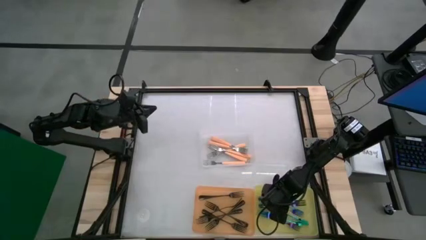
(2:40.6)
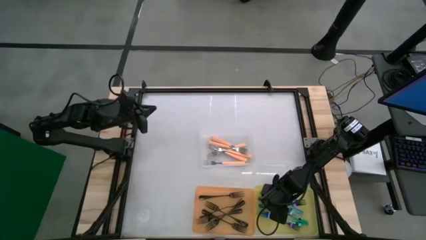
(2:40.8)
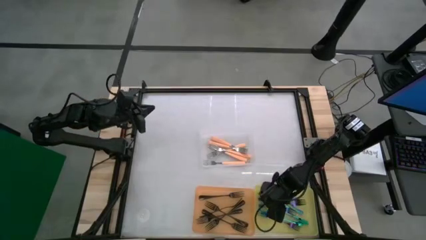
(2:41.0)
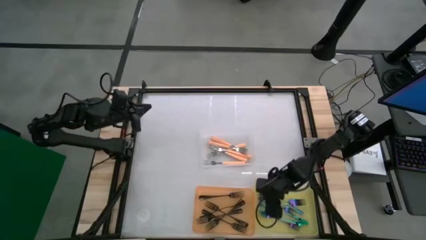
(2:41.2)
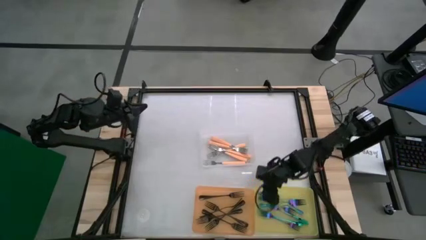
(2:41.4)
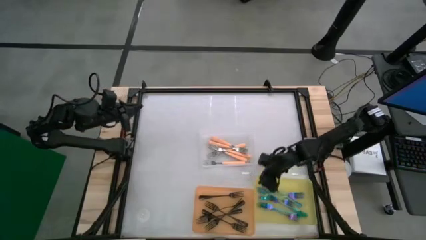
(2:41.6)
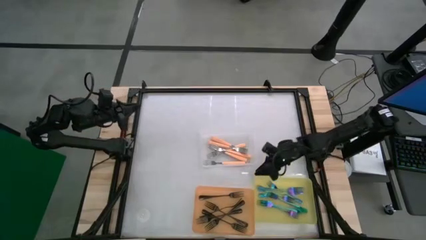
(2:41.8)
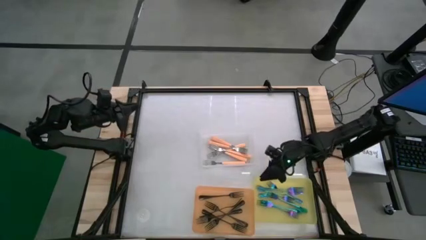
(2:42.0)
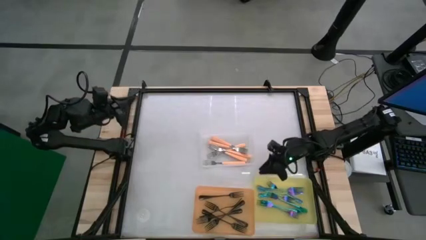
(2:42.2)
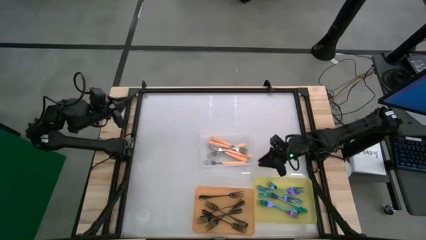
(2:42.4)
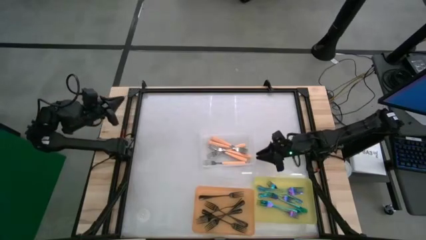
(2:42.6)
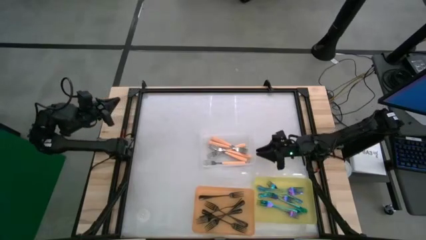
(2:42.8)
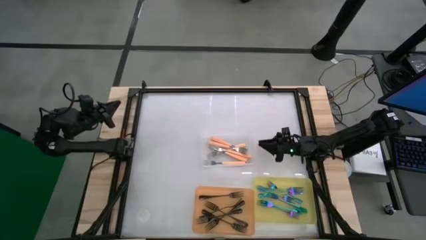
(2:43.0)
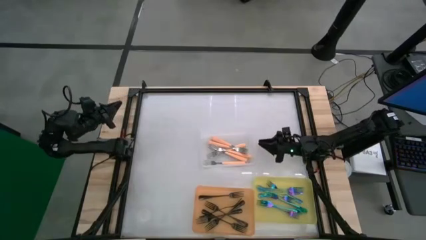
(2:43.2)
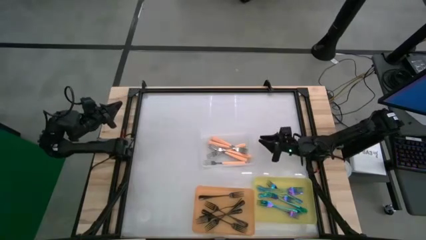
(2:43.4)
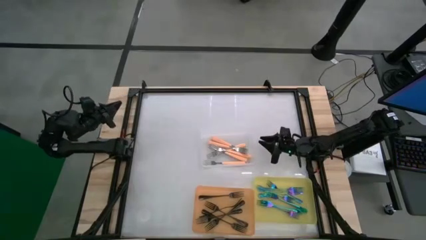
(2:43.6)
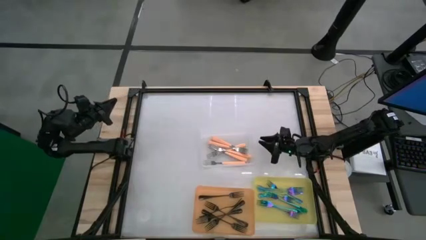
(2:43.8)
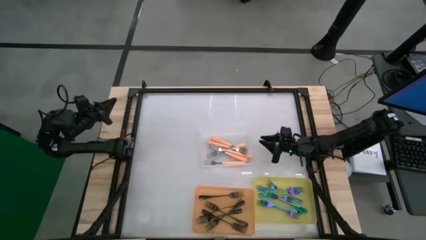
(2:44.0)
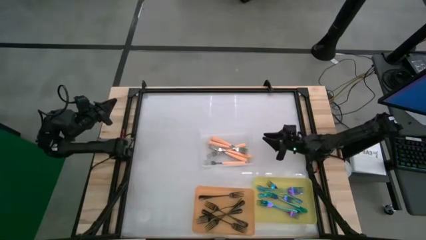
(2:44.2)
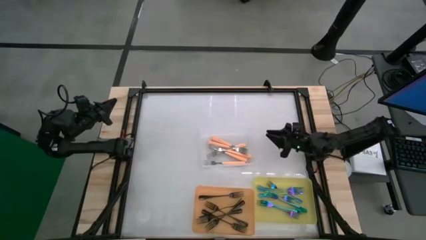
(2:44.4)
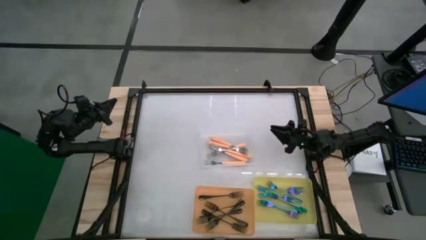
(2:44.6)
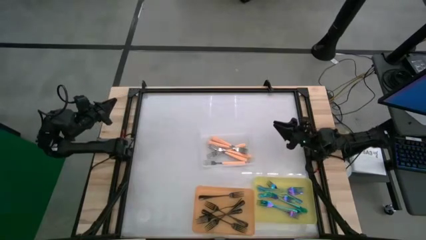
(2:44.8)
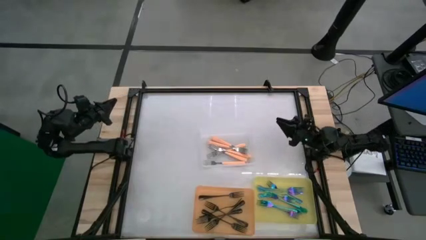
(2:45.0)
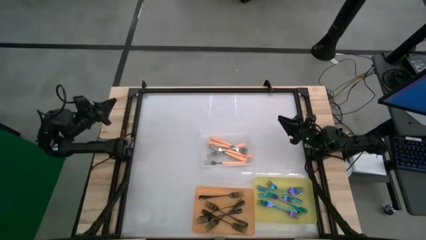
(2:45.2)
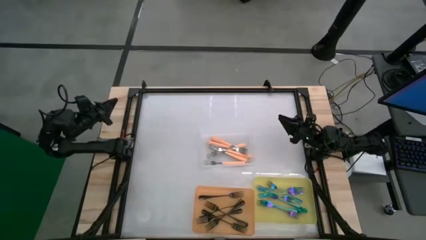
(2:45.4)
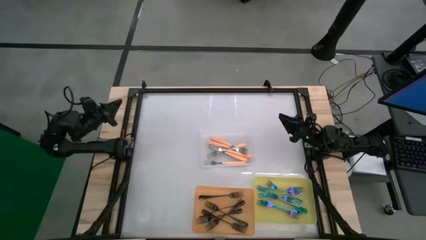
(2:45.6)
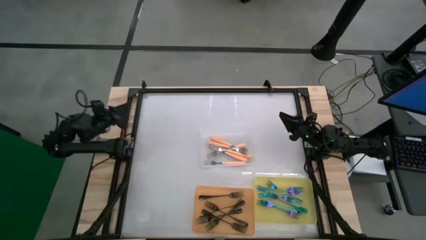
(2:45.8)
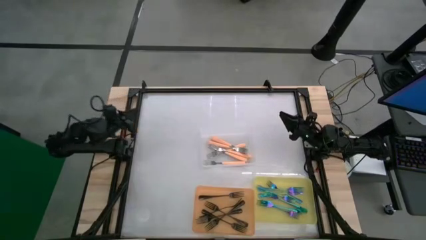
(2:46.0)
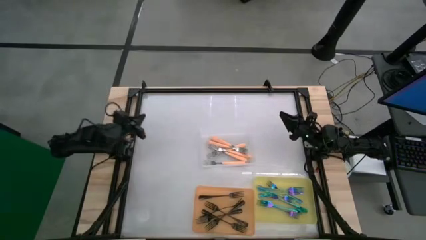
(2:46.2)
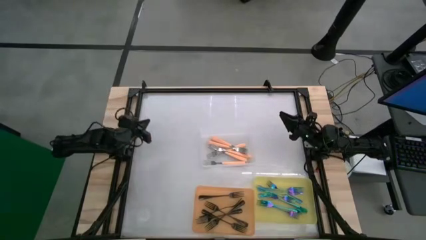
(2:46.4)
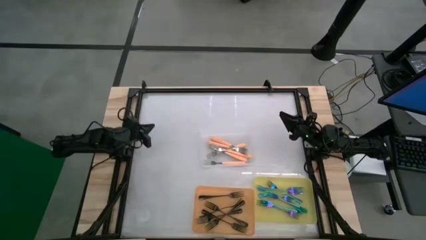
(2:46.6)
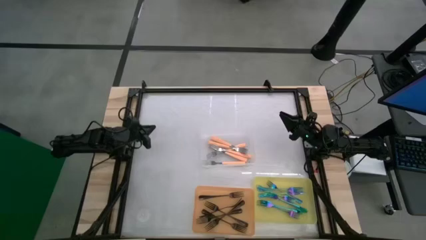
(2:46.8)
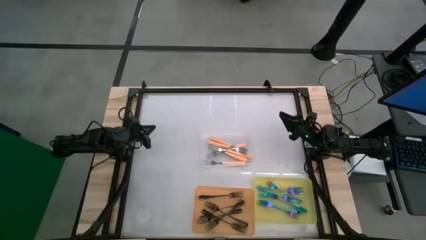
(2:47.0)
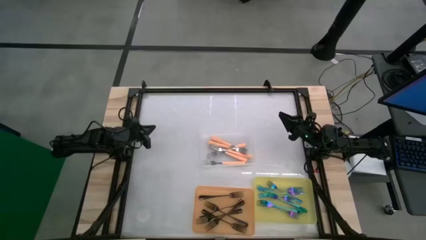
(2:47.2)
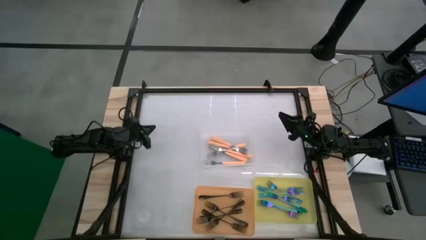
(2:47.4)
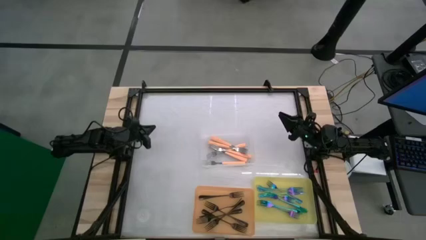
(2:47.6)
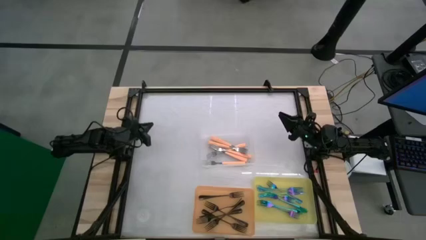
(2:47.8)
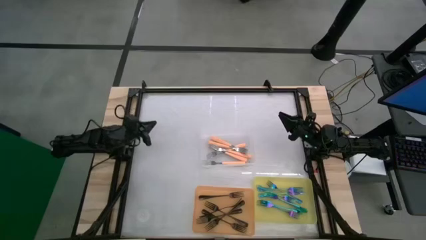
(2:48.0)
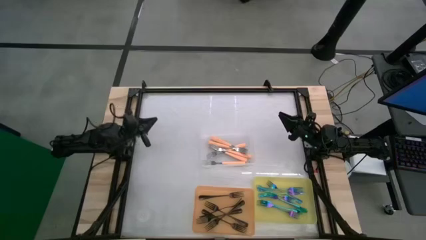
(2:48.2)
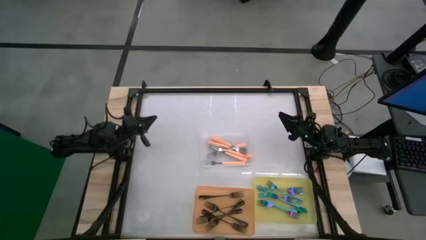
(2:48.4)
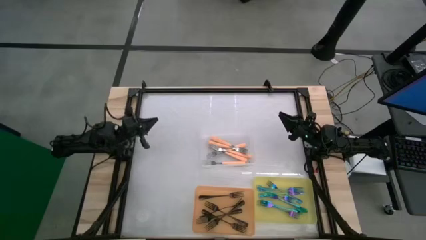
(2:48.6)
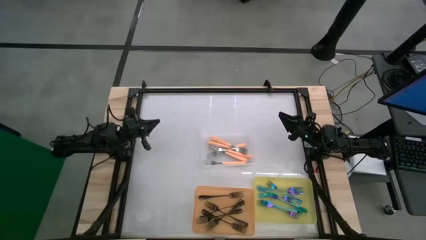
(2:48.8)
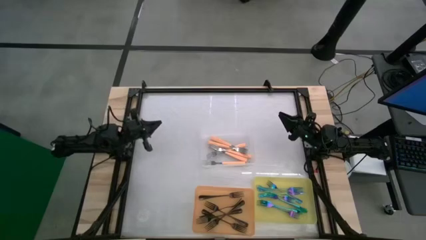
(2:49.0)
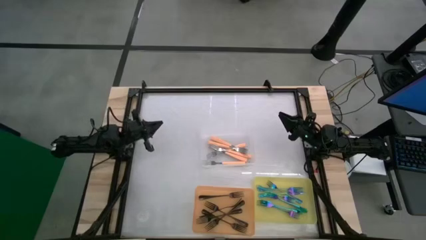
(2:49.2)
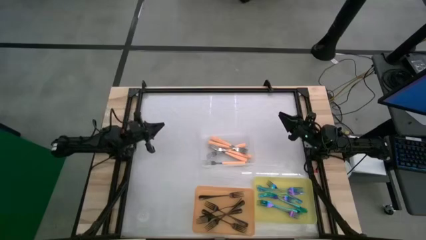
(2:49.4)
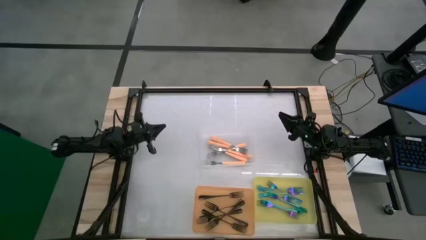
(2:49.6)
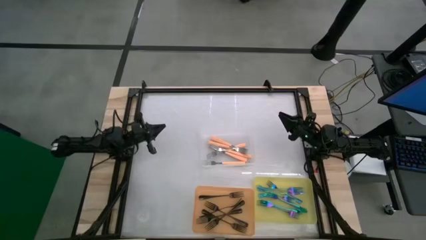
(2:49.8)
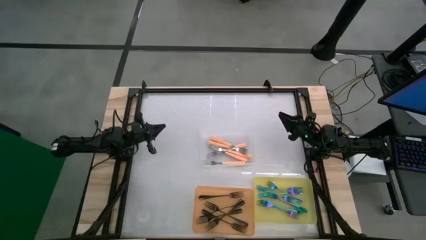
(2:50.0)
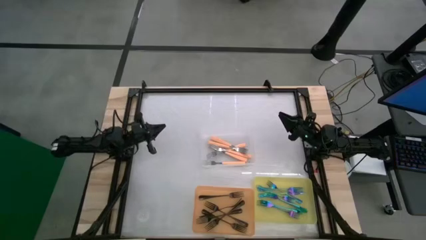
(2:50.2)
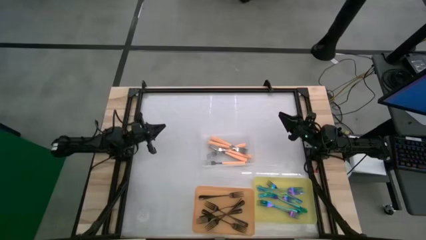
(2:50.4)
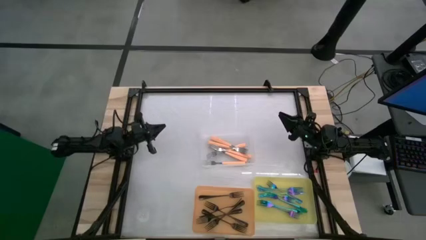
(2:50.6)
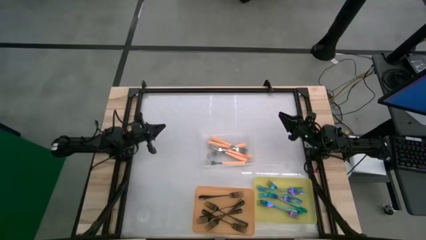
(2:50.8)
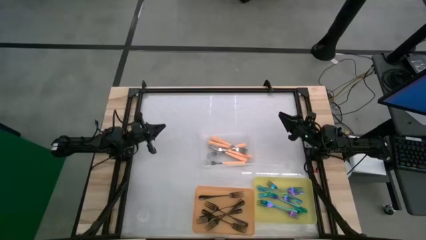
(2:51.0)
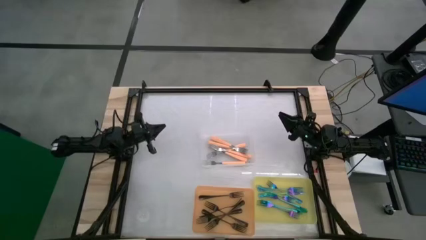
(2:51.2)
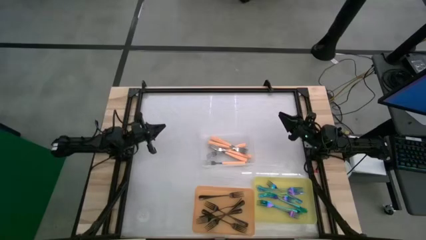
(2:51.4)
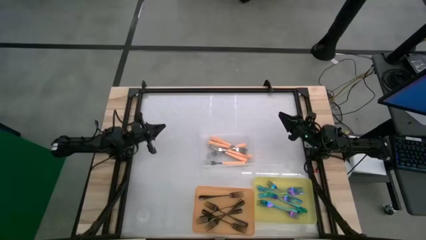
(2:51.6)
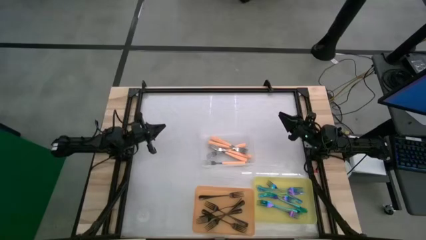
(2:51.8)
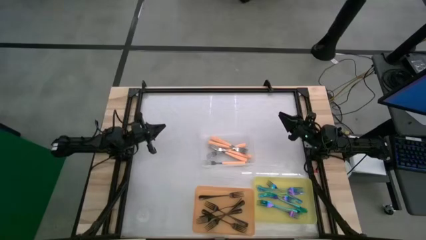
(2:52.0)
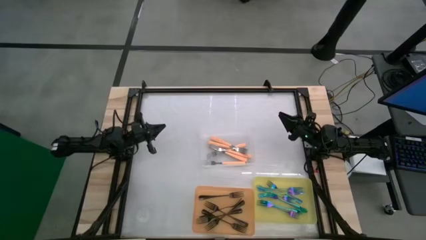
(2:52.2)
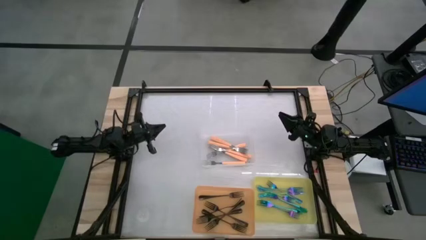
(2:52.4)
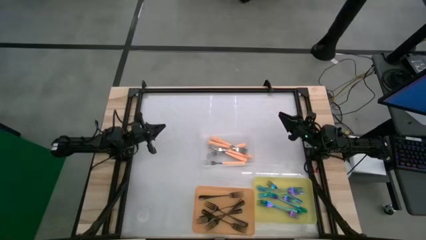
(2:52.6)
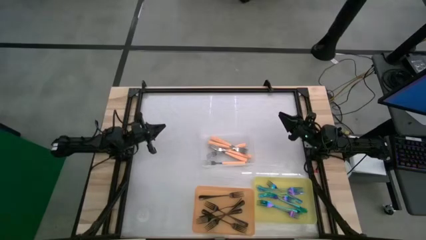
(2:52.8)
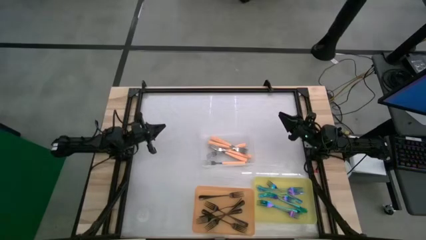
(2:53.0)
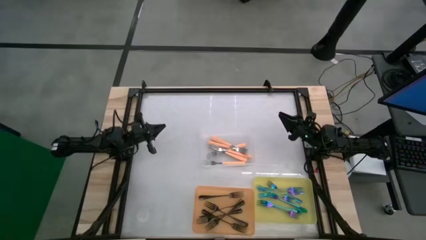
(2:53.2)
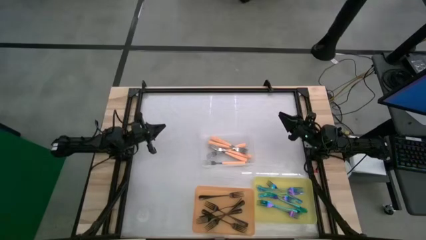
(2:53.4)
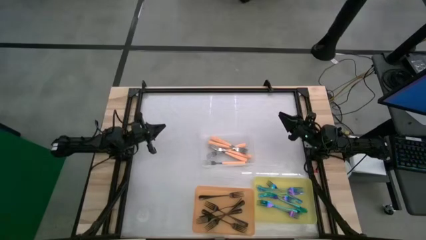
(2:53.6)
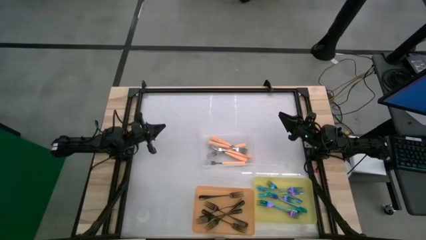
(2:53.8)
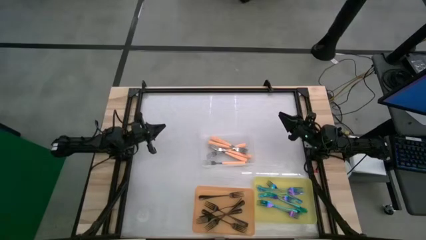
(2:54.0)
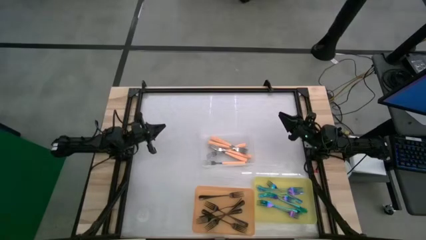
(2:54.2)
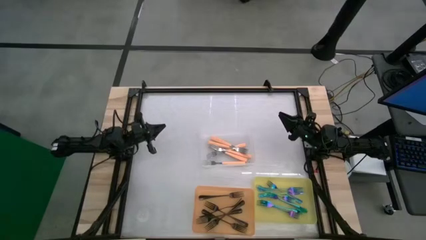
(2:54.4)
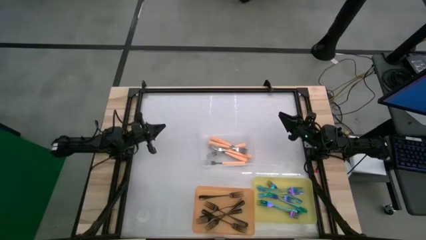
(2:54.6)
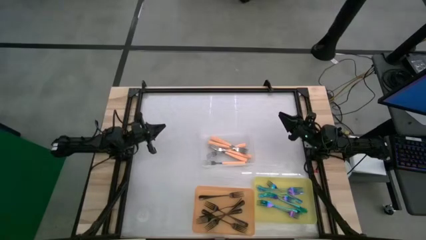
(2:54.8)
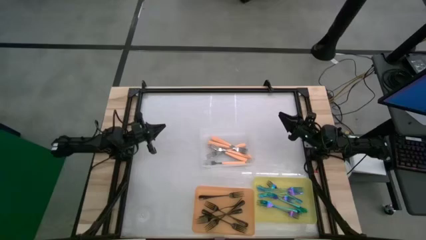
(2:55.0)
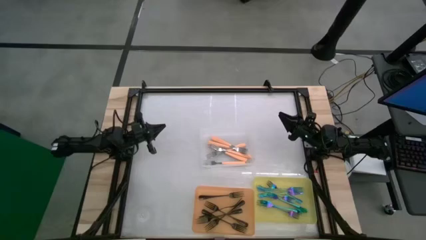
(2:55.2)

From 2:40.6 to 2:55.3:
Task: Sort silverware by color (type)
Return to Home Position

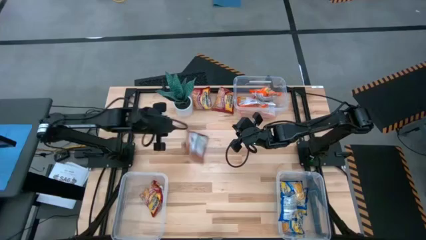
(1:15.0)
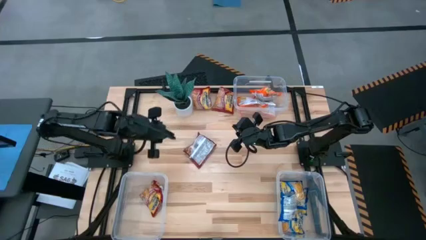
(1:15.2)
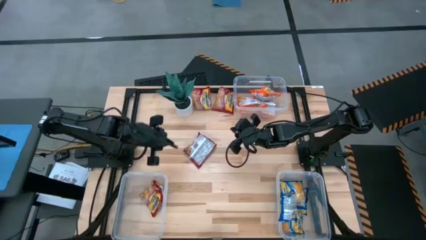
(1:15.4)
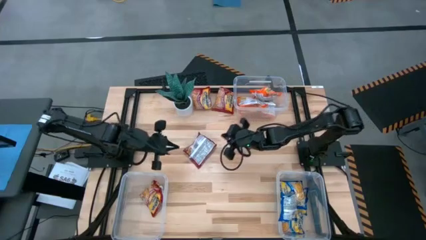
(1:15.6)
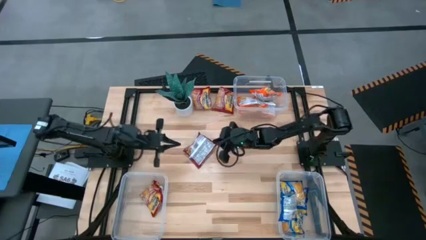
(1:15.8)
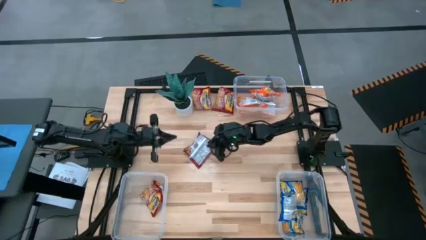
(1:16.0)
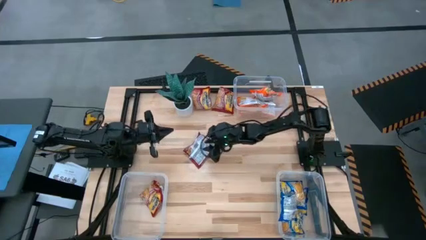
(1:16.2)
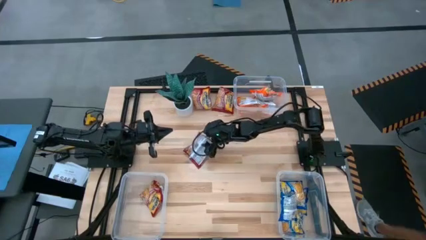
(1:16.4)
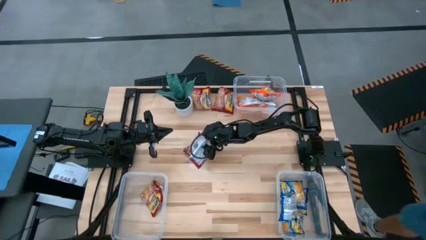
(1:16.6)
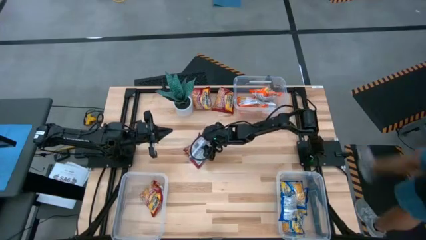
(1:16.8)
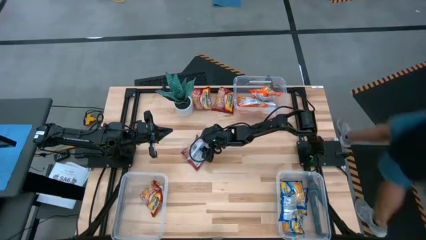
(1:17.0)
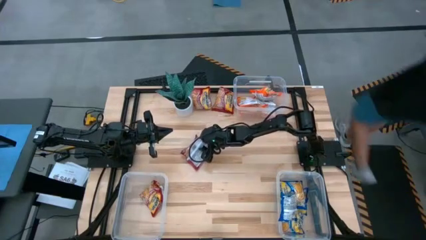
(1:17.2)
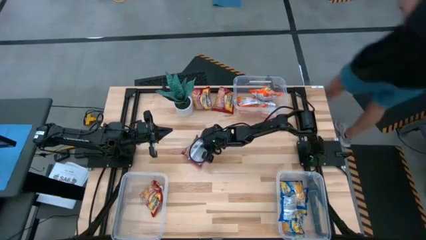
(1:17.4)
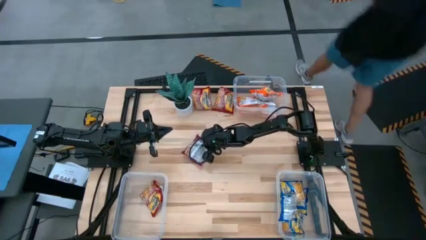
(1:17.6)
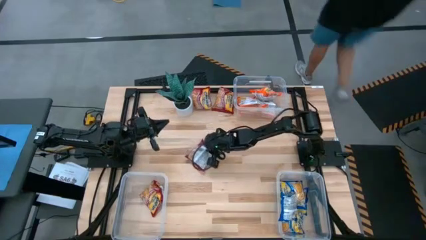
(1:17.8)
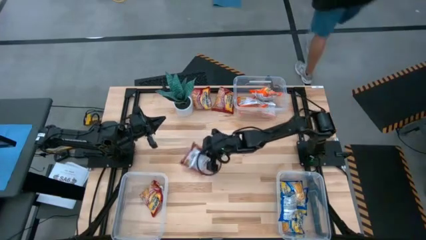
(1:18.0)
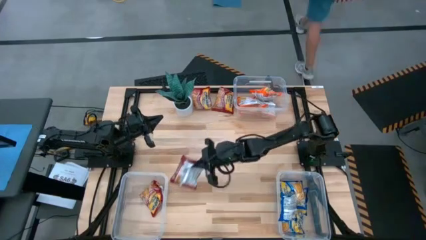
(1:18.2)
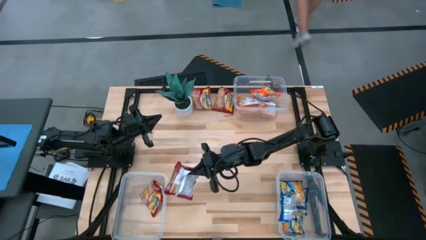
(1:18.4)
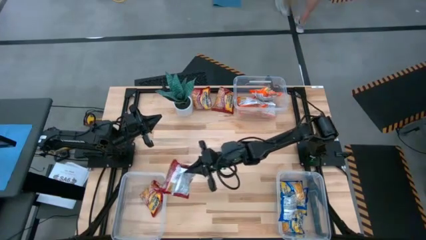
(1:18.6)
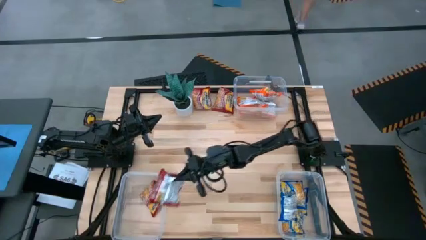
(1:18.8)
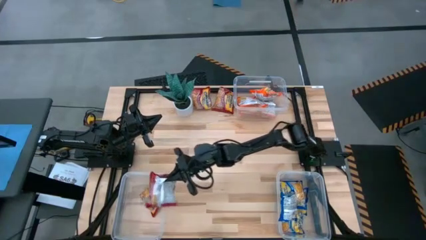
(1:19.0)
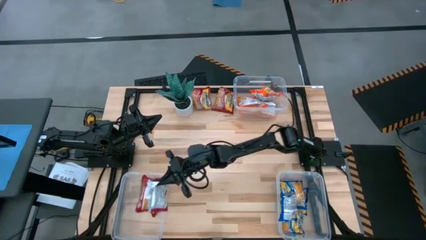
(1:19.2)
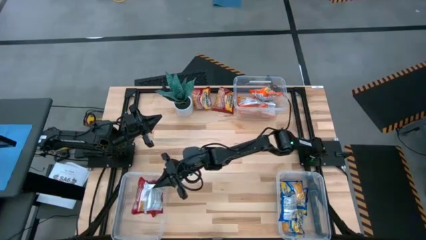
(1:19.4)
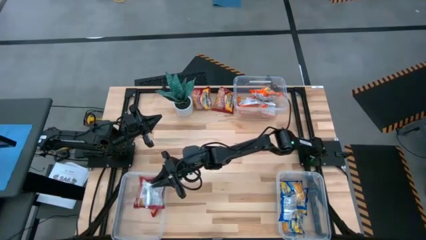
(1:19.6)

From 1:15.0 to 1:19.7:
Task: Sort Maruchan noodles
Put the red noodle pack into the bottom left transparent bin
